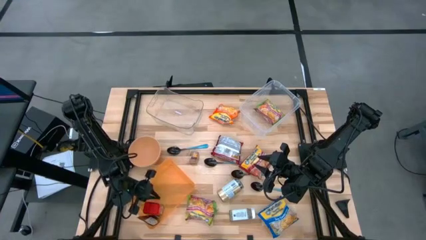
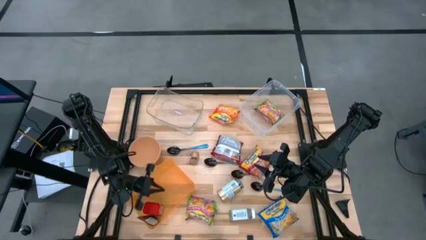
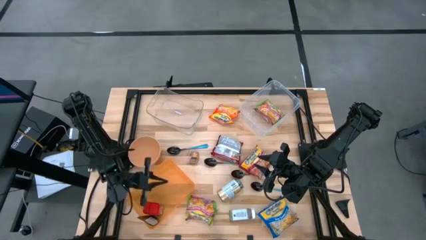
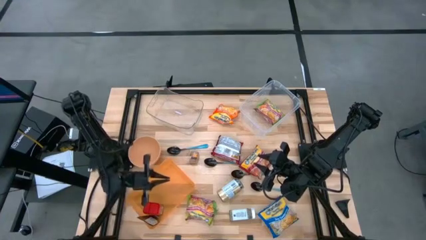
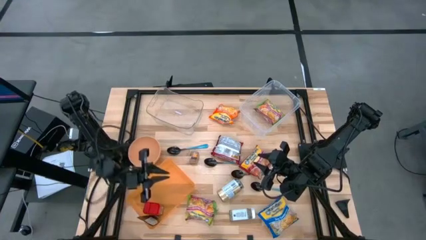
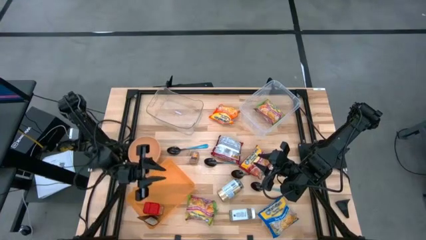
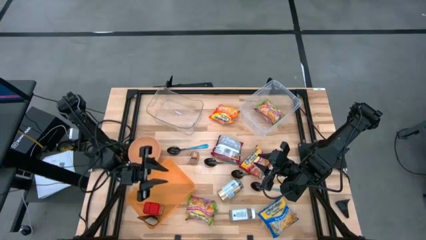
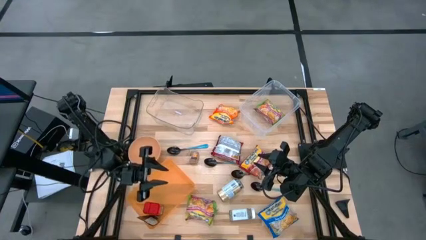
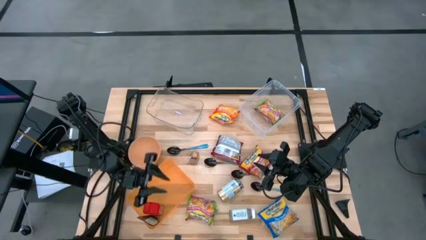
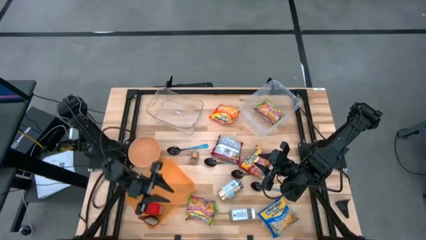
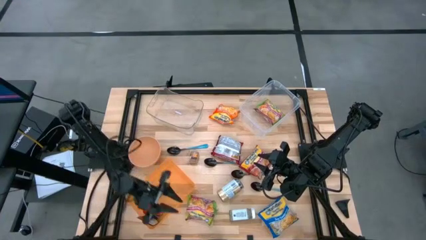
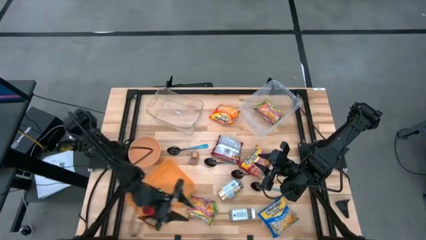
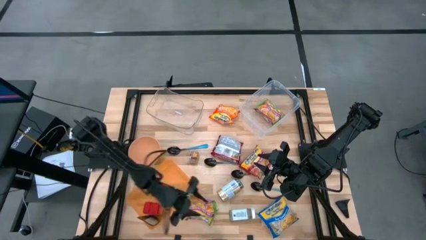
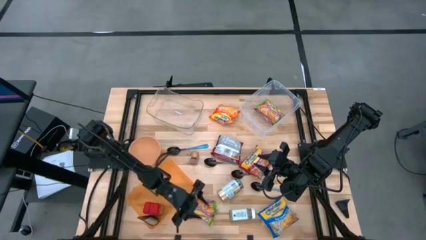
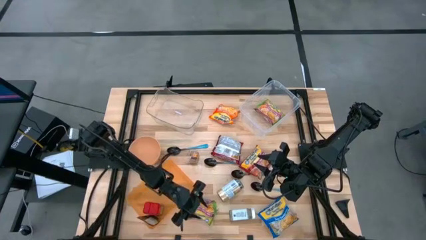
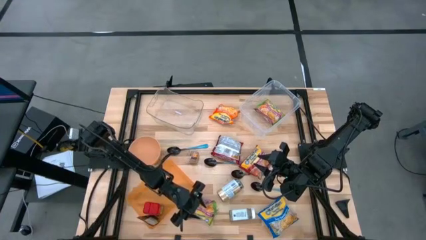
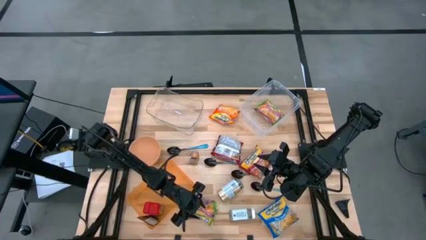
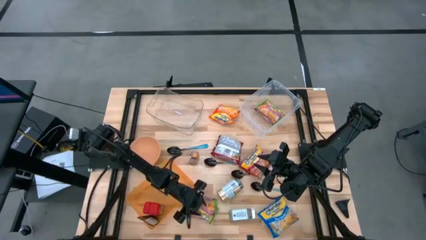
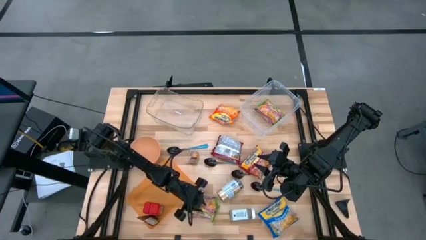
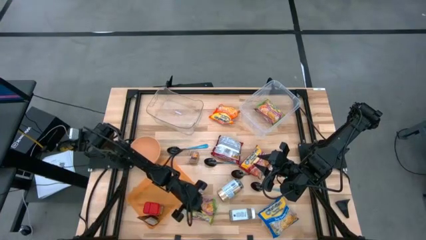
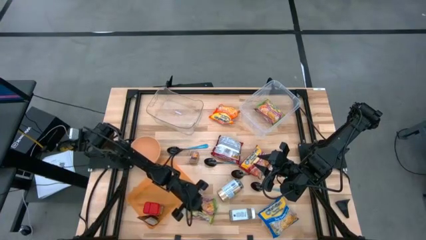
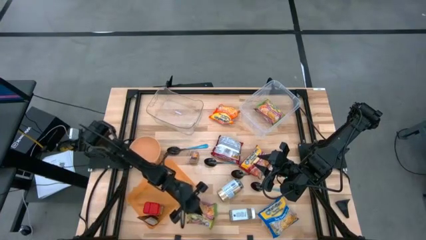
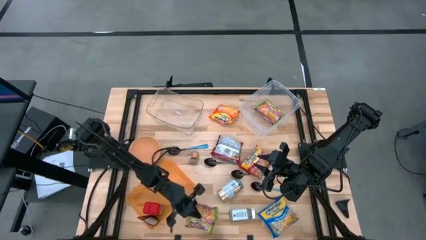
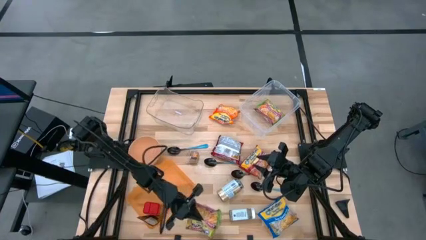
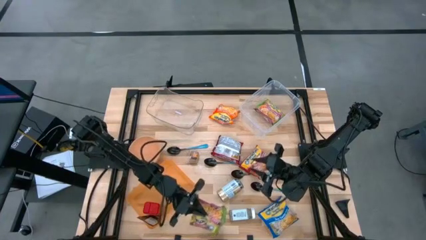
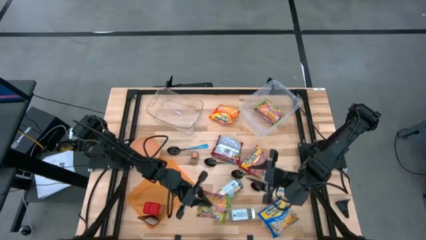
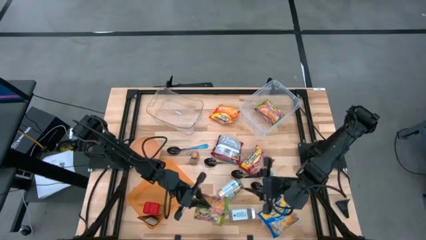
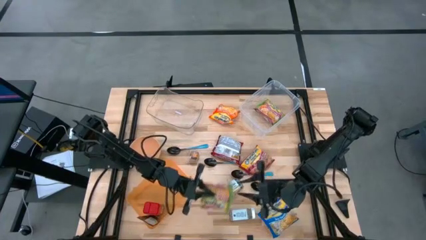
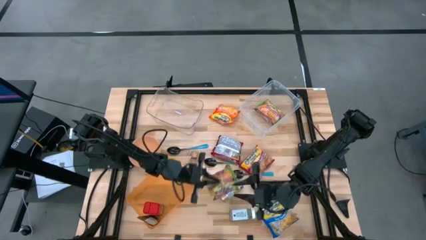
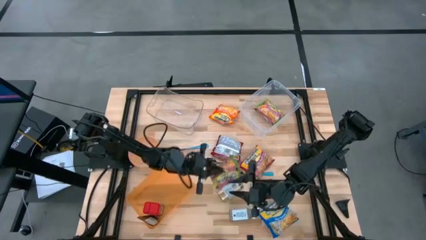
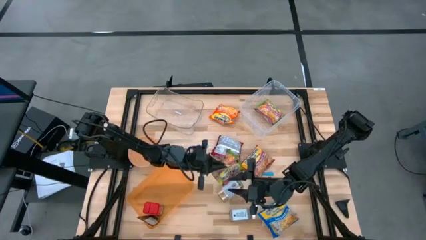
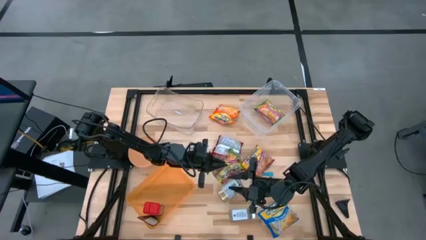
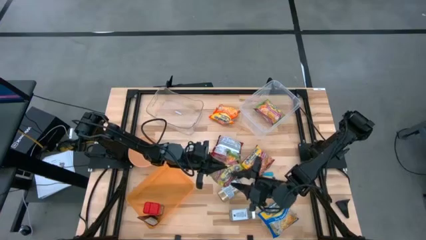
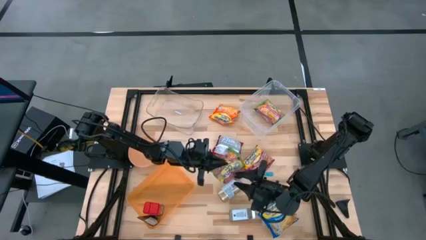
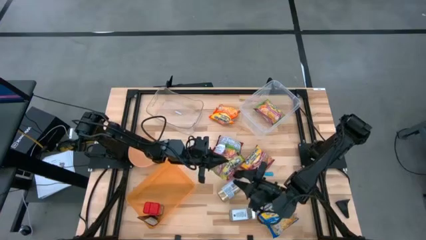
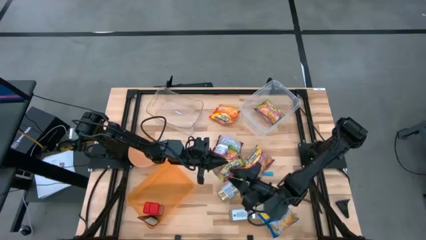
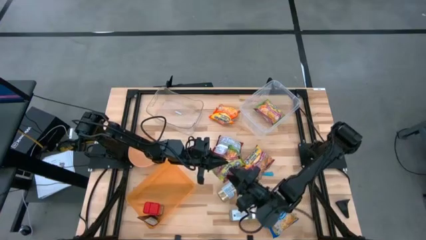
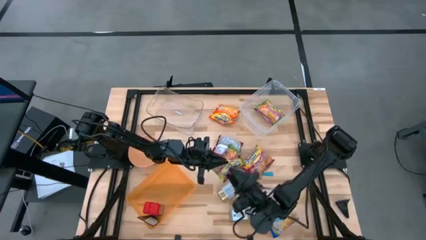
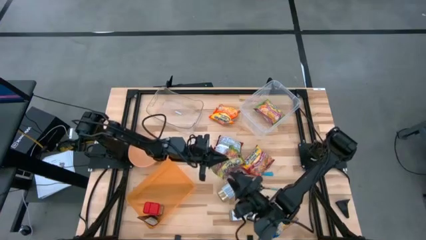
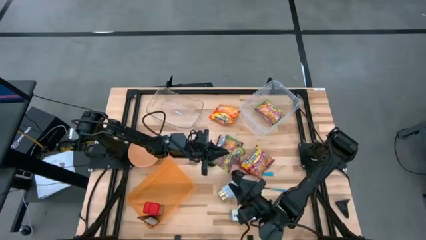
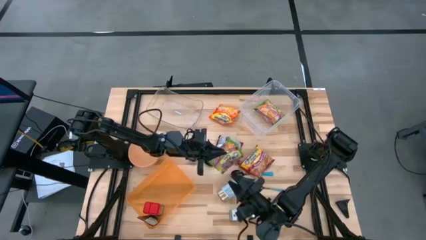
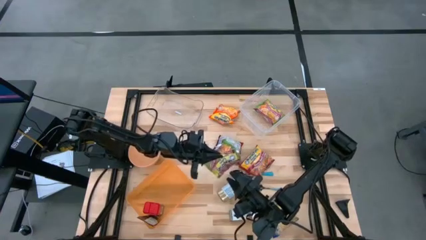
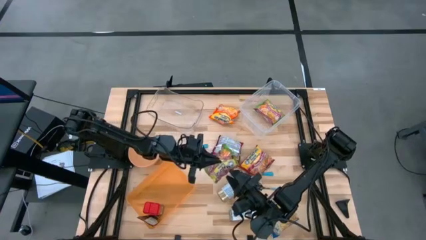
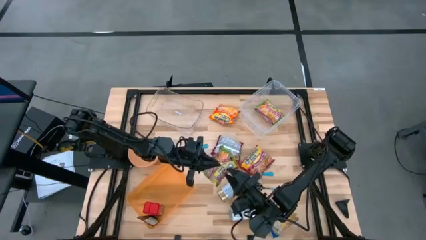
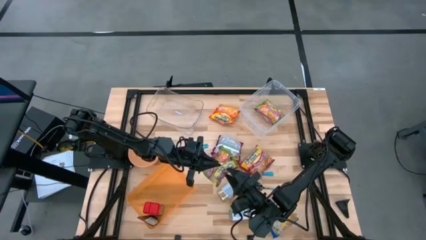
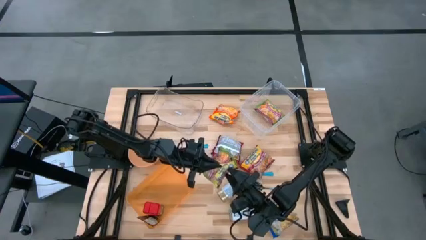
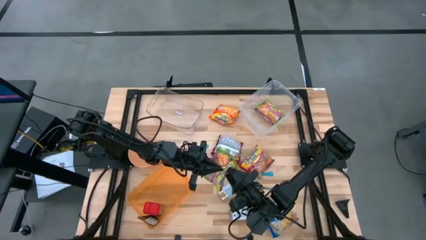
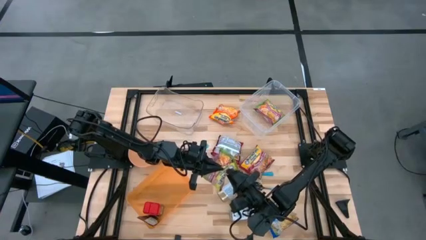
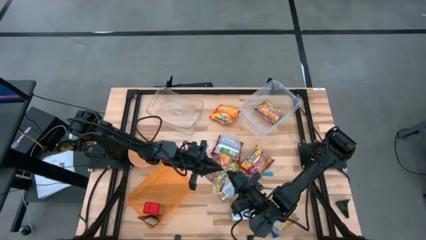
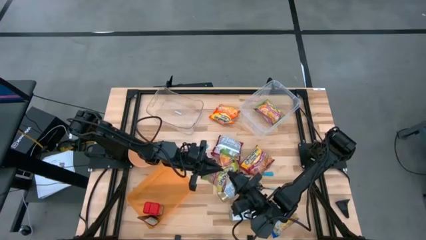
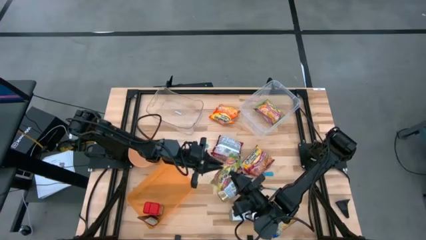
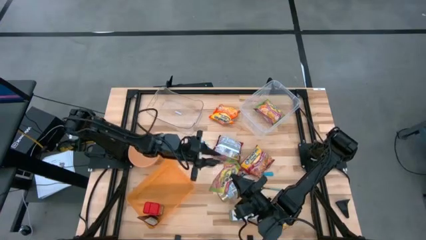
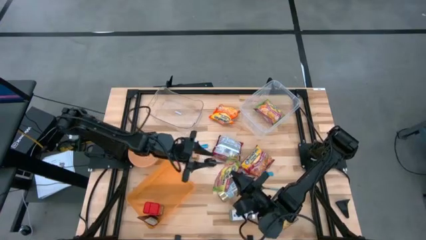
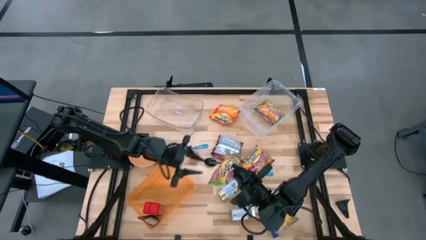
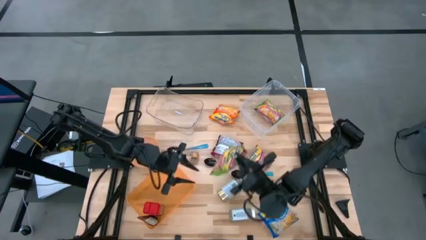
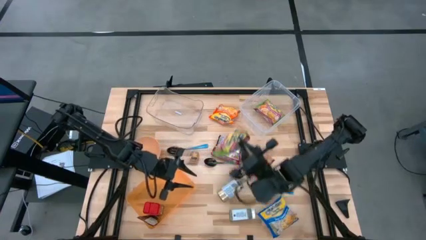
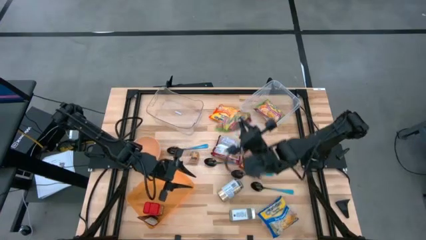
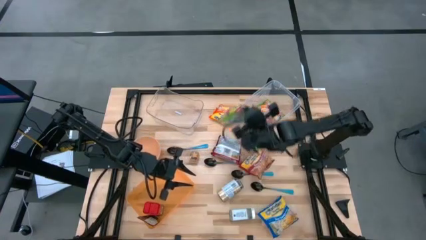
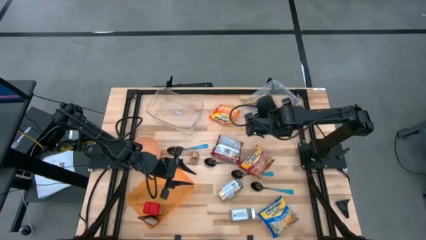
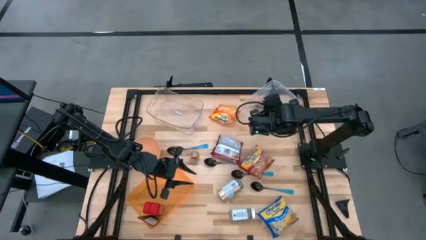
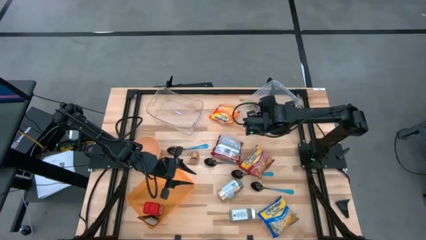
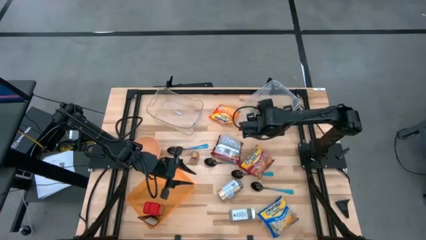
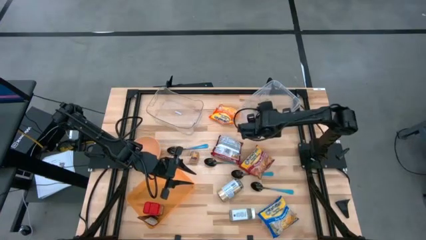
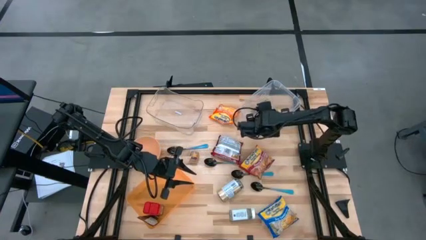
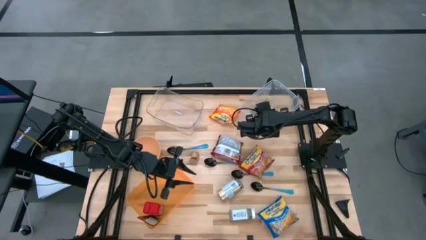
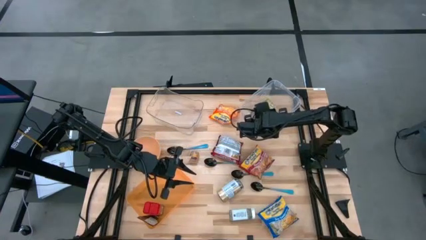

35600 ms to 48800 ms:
Task: Pick & Place Food Item
Put the green noodle pack into the right transparent bin
